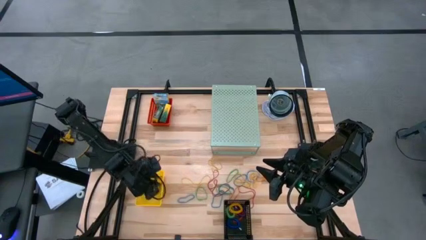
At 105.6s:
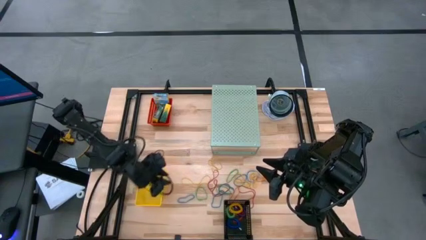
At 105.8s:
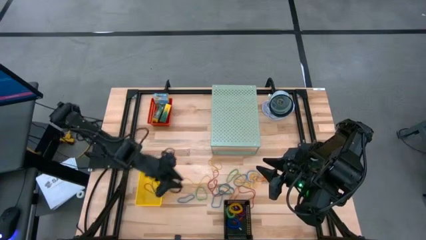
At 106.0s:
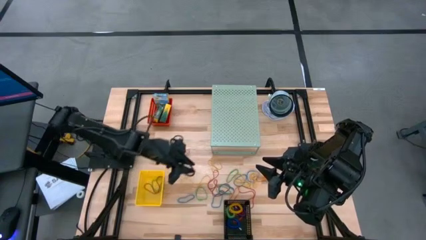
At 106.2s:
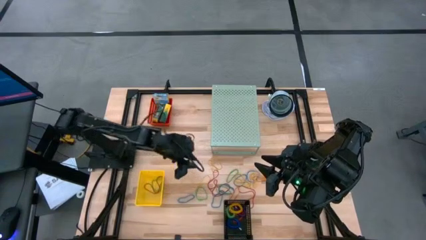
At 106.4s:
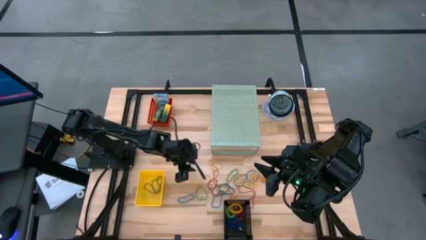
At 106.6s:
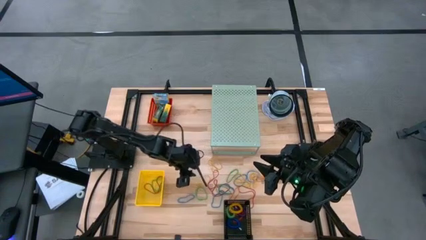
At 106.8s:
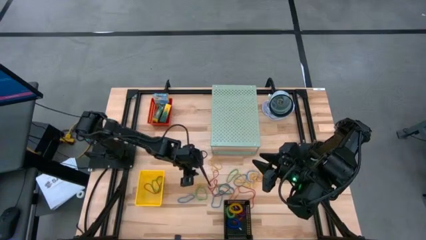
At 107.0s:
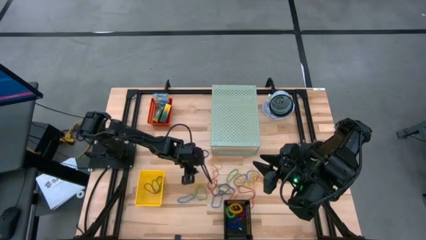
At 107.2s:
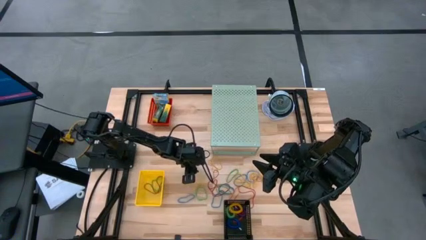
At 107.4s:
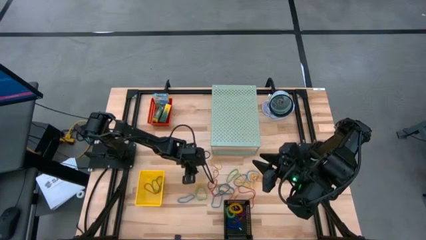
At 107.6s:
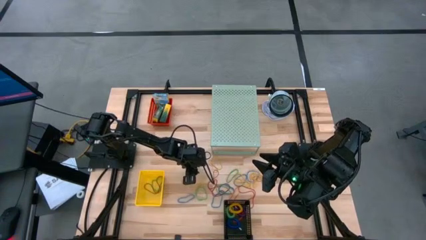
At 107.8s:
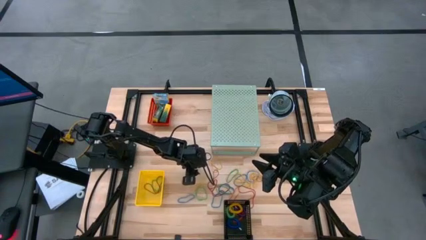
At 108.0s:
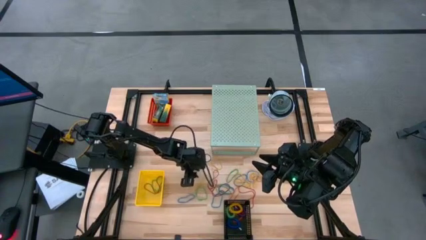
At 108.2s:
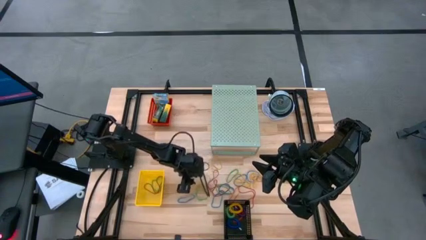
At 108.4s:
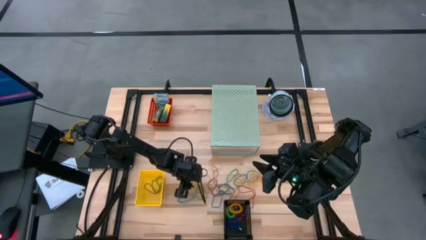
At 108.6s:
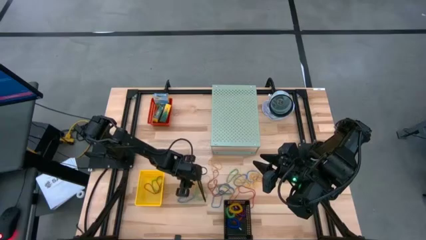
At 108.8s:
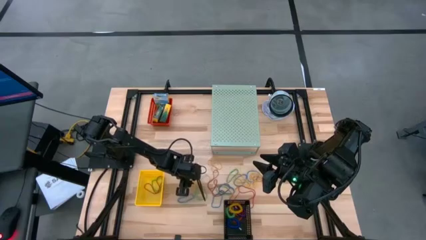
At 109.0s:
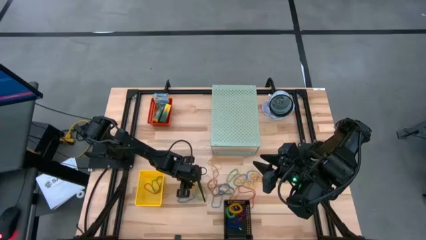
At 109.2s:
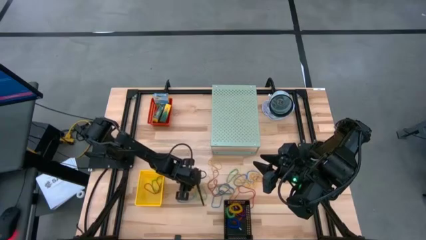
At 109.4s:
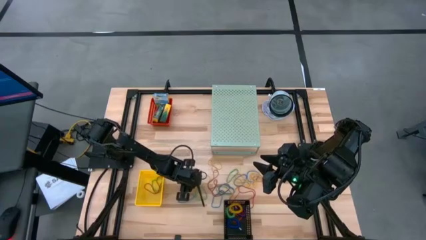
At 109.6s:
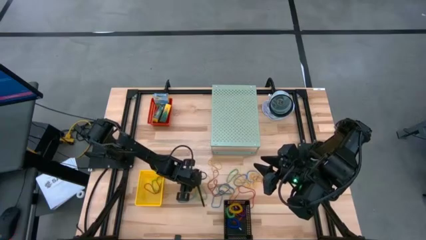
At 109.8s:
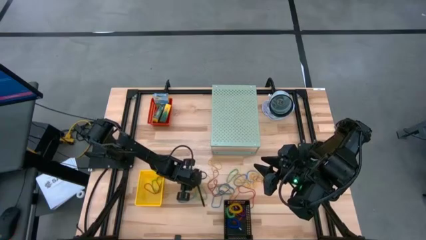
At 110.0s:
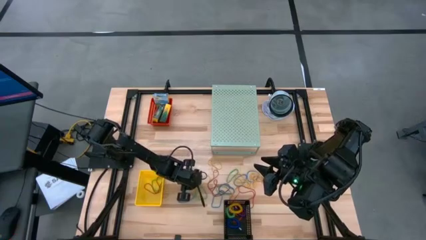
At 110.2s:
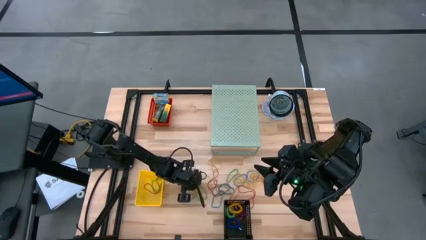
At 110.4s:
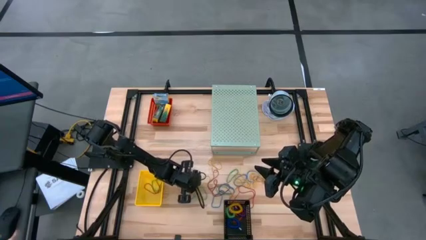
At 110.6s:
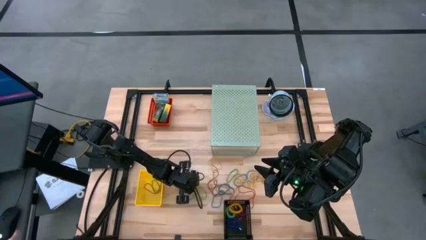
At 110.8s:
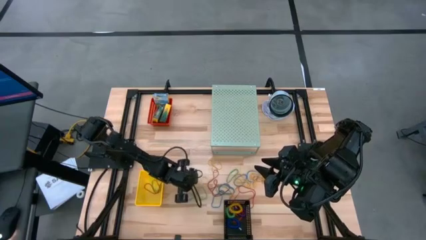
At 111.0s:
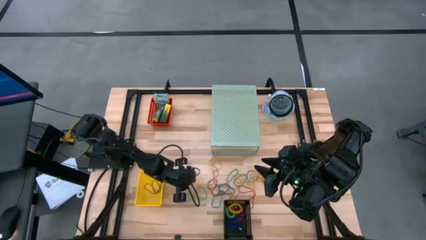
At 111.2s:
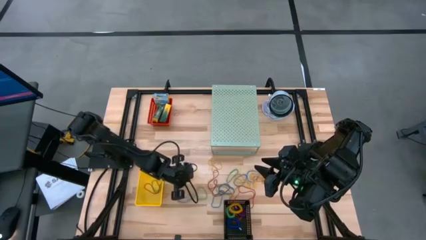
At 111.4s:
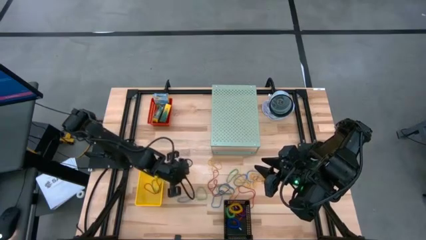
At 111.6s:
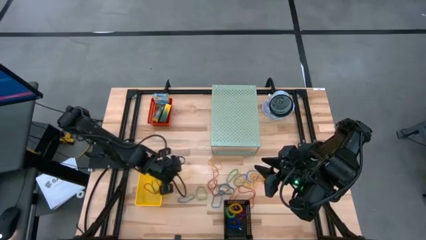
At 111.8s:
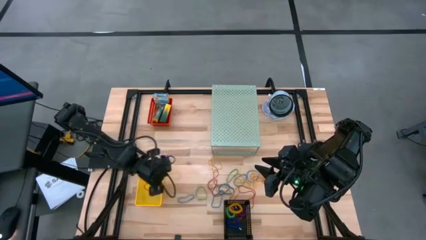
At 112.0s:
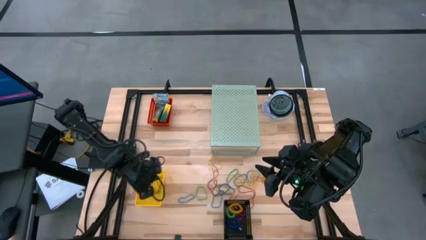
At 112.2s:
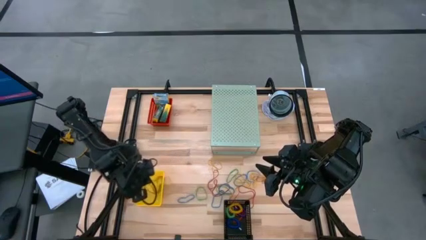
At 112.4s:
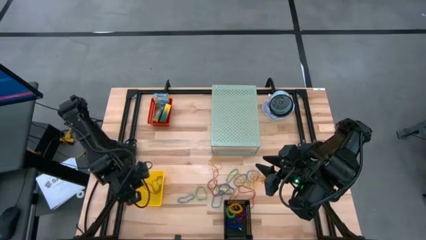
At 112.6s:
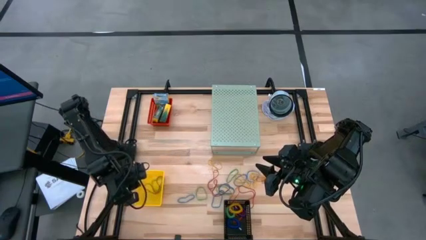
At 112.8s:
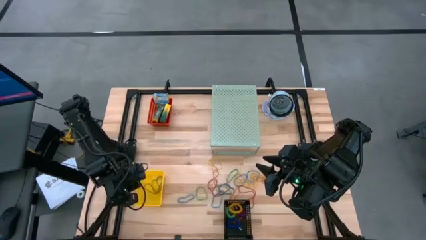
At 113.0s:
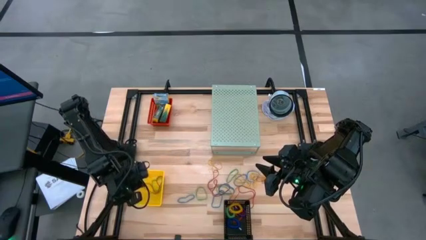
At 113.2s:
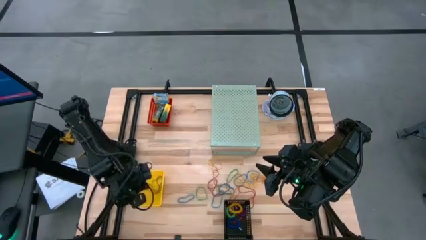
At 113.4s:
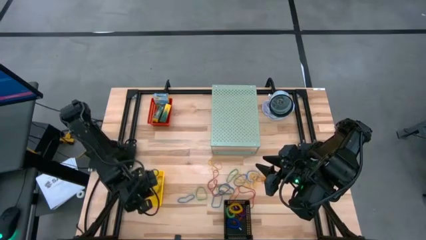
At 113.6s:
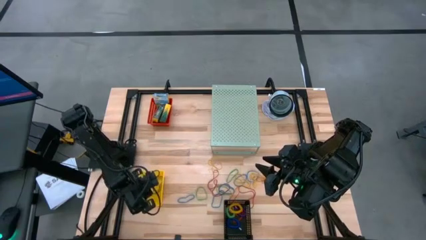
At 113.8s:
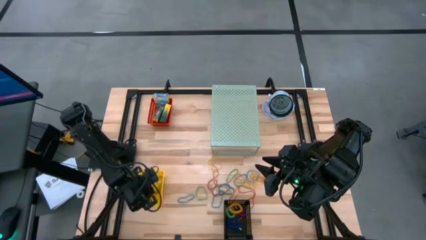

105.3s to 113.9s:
Task: Pick & Place Office Desk Supplies
Put the yellow rubber band into the yellow bin

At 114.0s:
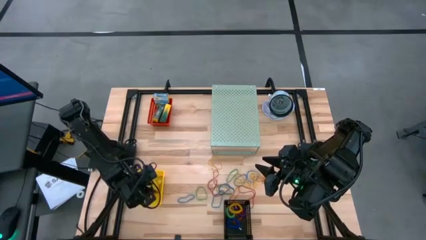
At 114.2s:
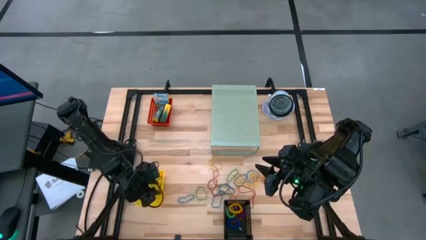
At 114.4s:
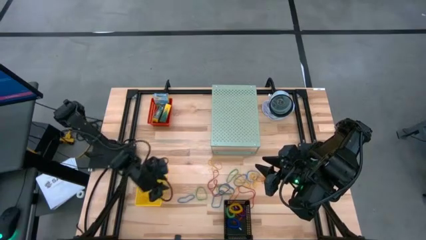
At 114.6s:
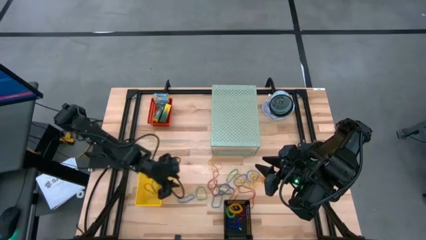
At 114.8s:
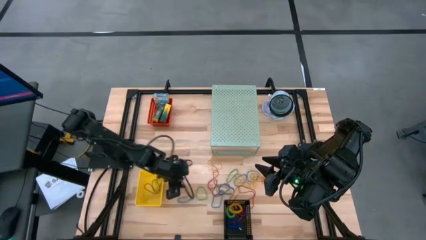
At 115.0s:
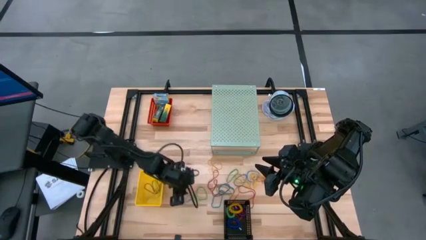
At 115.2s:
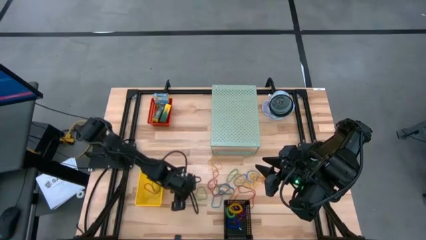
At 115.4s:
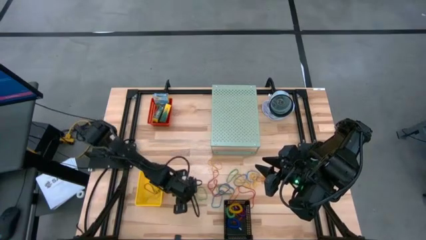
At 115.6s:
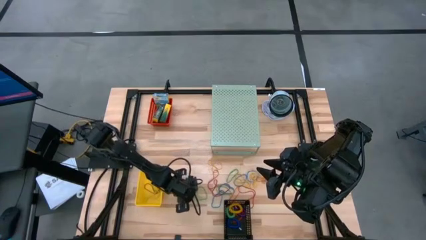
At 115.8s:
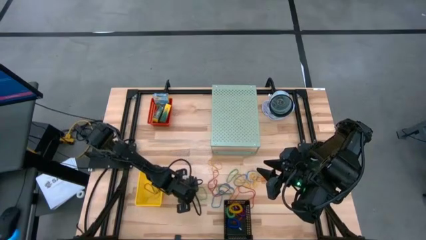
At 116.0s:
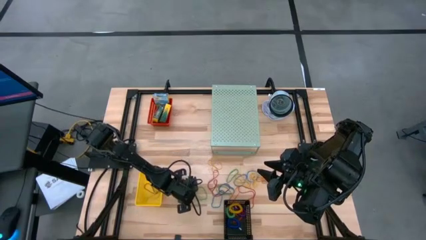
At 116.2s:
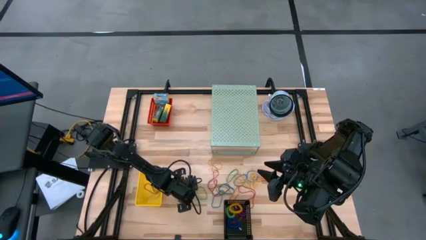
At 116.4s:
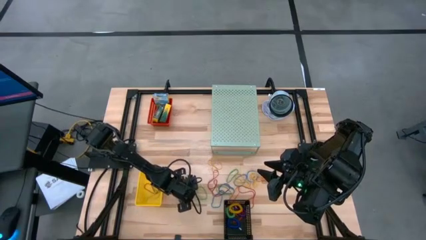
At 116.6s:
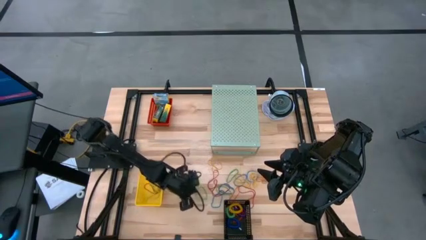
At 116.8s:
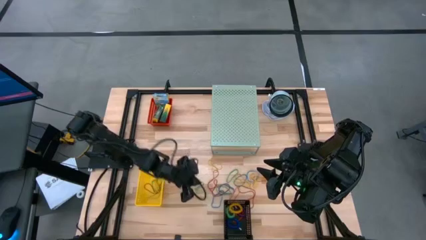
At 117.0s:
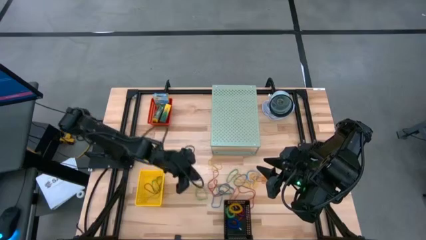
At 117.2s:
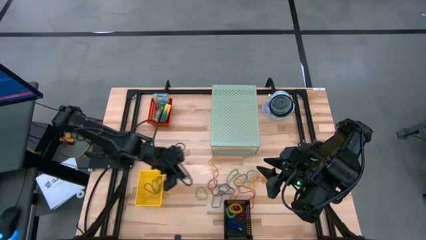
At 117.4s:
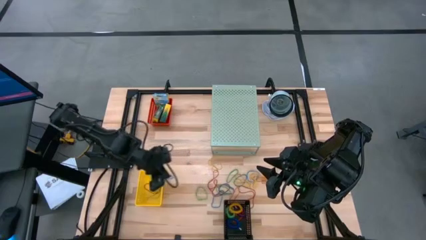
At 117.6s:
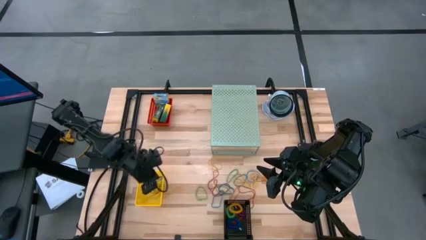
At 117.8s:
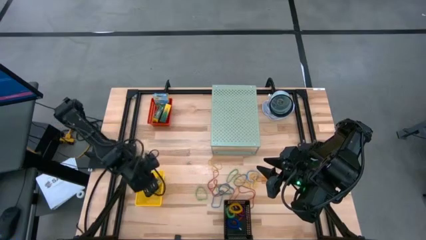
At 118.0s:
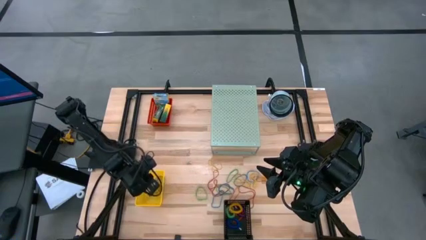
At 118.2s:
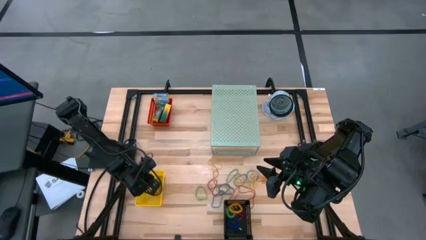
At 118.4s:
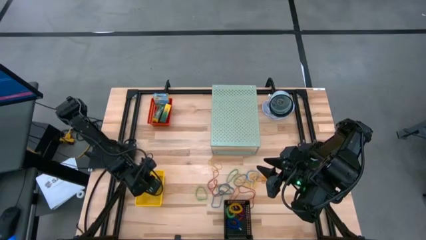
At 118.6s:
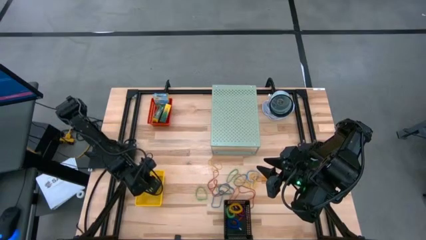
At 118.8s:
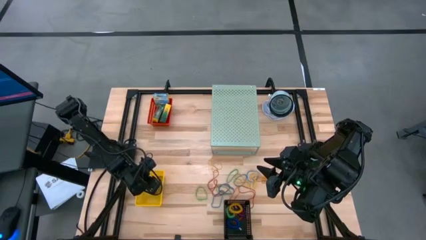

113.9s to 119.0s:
Put the blue rubber band into the yellow bin

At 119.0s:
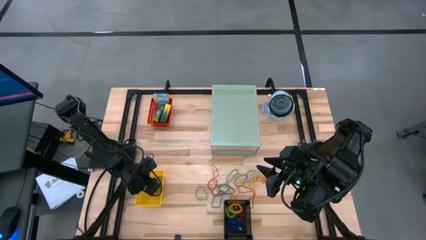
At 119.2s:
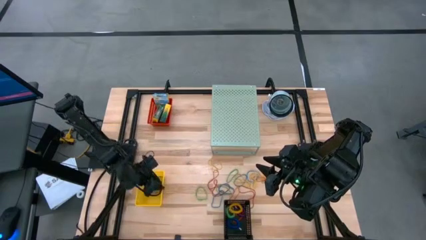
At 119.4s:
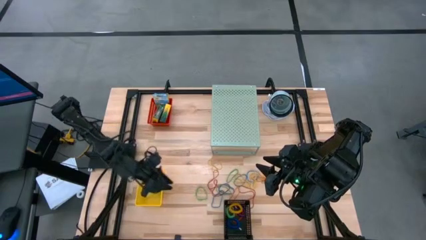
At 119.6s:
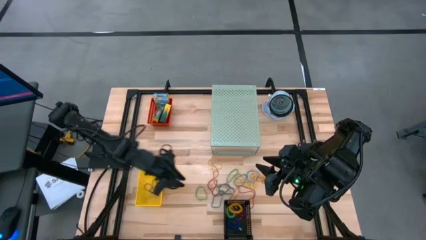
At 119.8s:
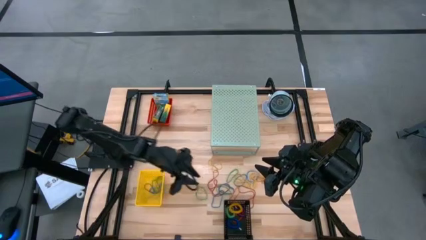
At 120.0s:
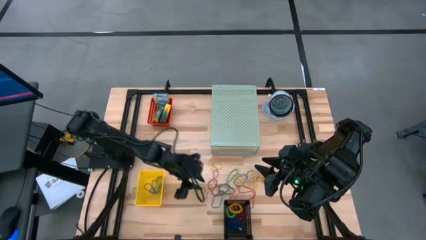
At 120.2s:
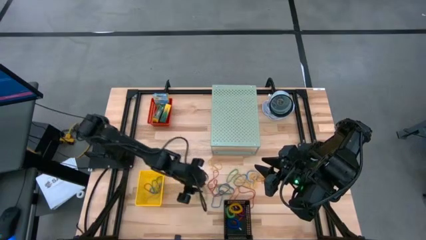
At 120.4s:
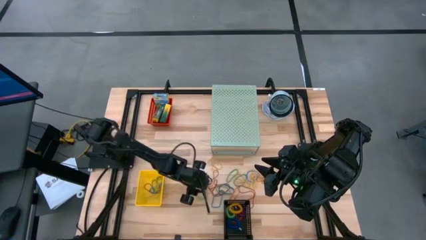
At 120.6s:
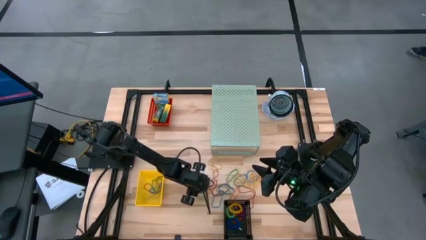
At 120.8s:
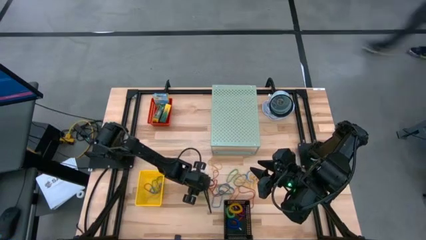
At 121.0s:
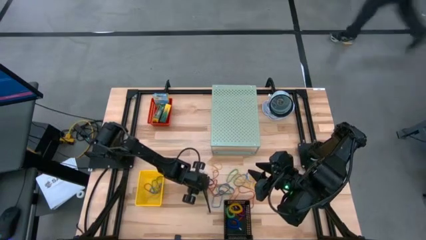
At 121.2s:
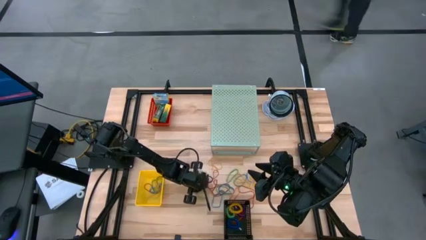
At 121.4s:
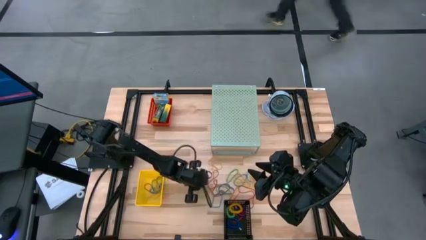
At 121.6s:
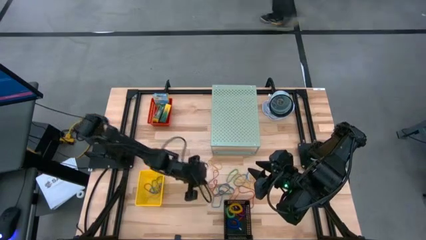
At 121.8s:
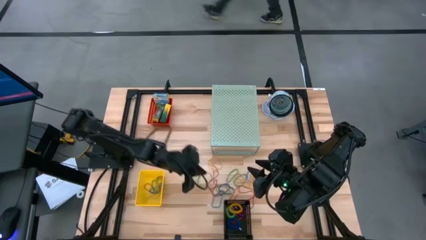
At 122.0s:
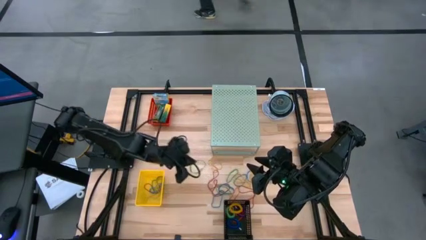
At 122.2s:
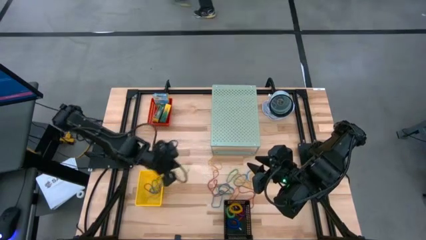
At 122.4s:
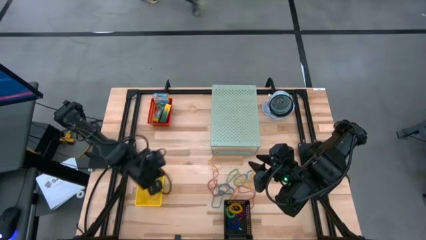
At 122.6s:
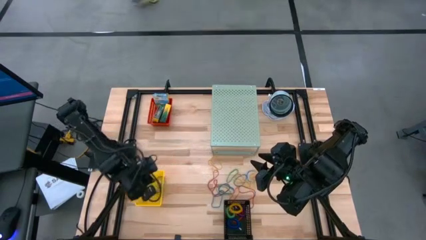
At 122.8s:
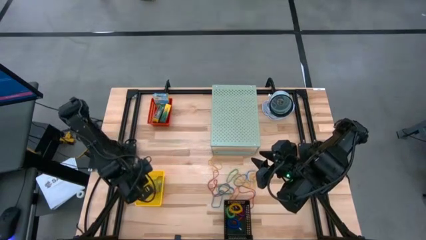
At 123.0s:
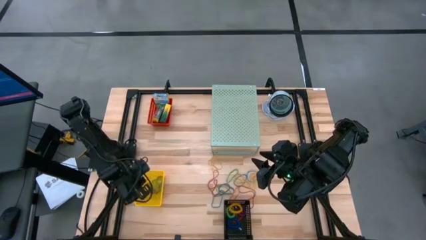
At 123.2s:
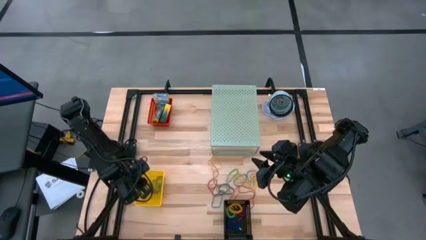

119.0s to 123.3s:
Put the green rubber band into the yellow bin
